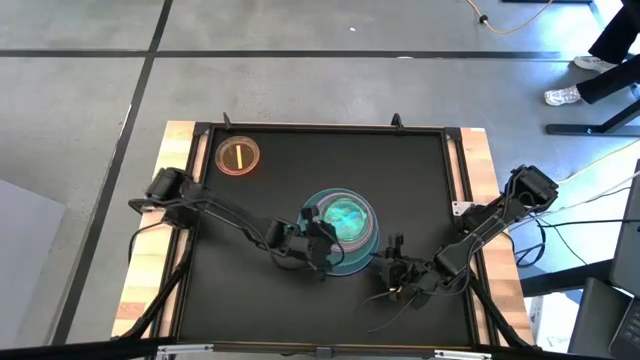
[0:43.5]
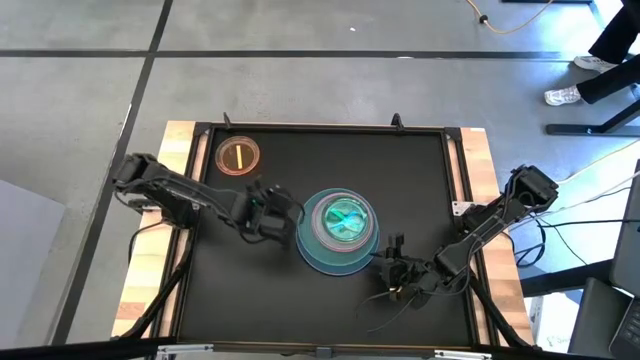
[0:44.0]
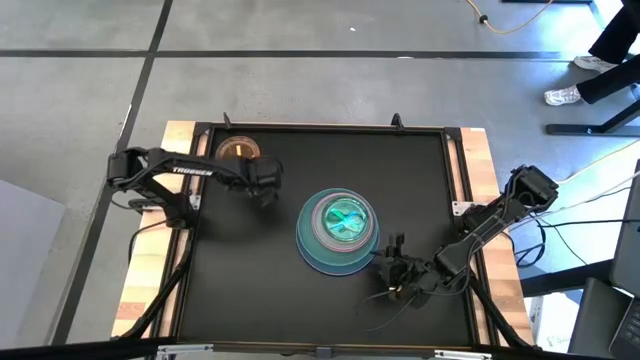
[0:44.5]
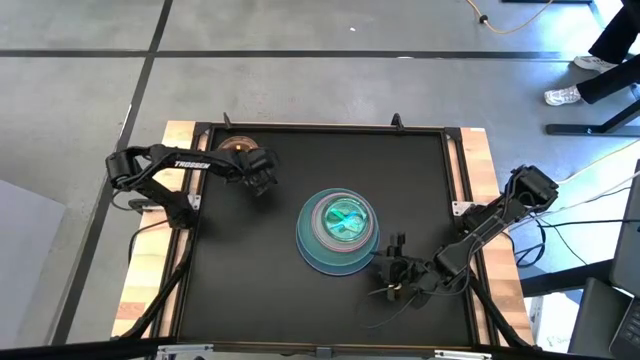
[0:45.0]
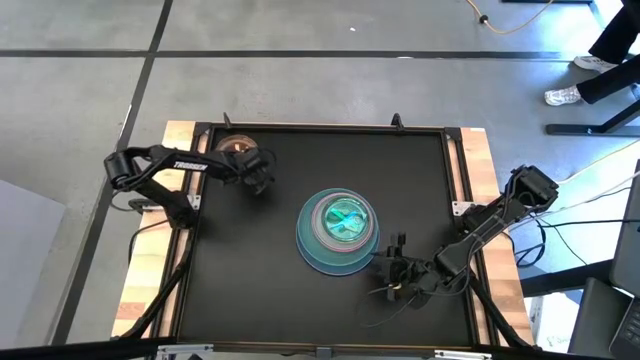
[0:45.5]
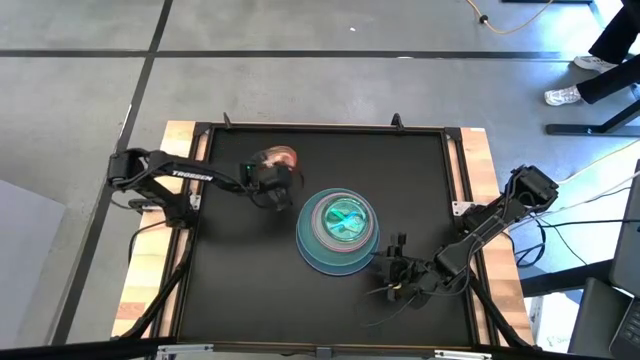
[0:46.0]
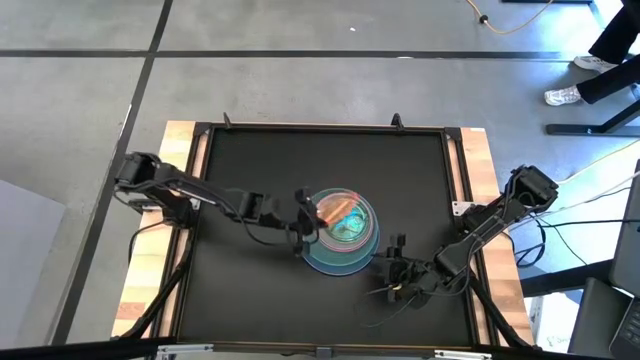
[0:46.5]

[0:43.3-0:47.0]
Task: Stack plastic plates
Stack the light orange transparent plate on the light blue transparent plate

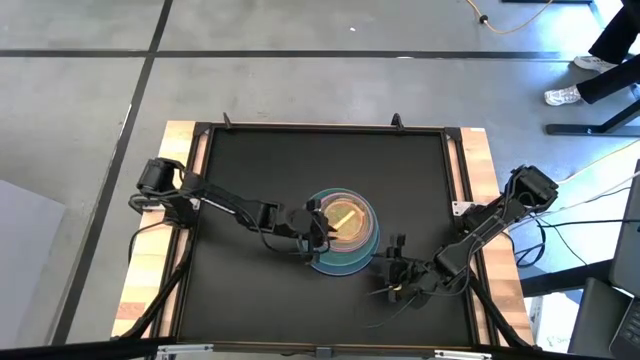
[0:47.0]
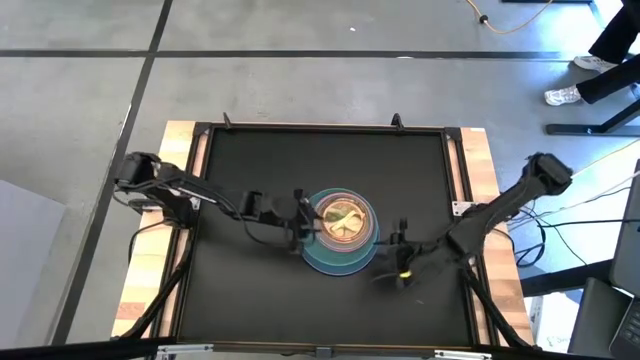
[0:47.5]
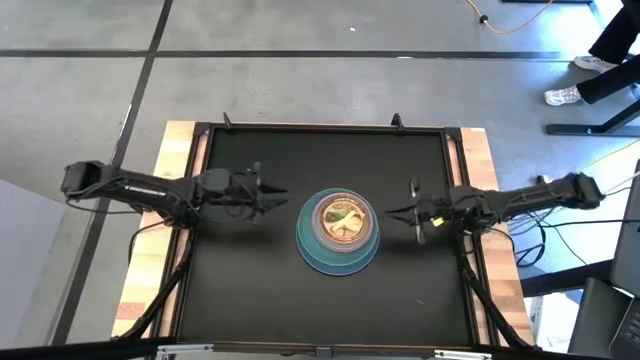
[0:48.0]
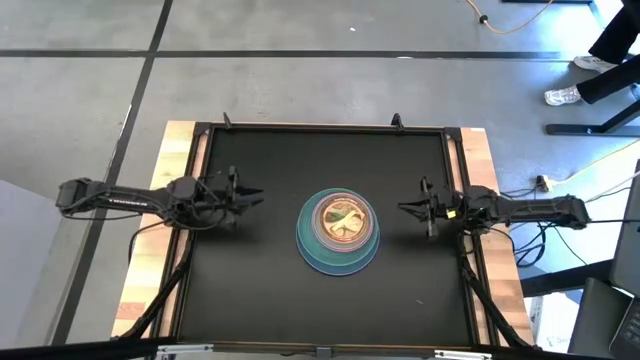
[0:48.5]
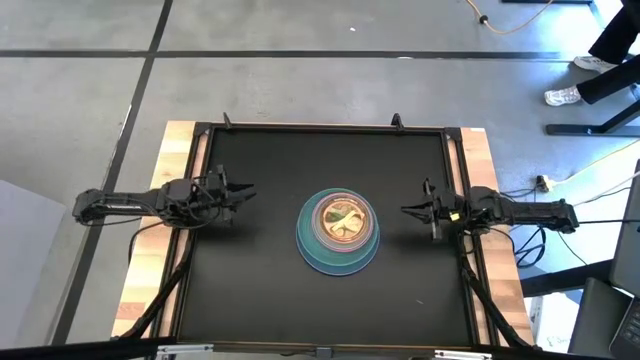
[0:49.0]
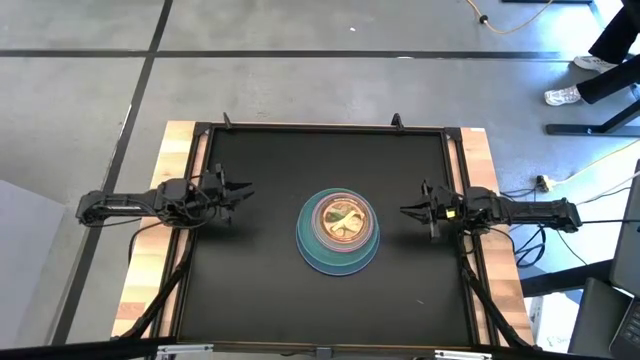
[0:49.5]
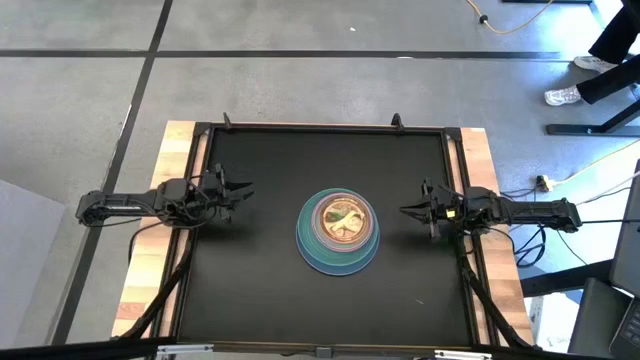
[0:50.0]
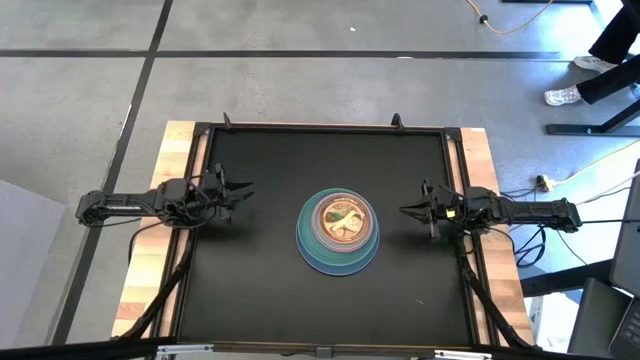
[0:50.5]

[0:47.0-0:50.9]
Return to Home Position

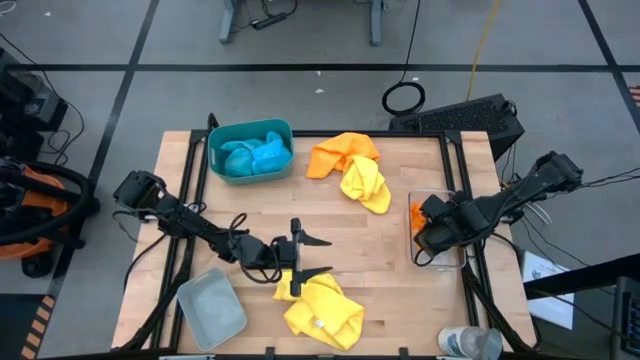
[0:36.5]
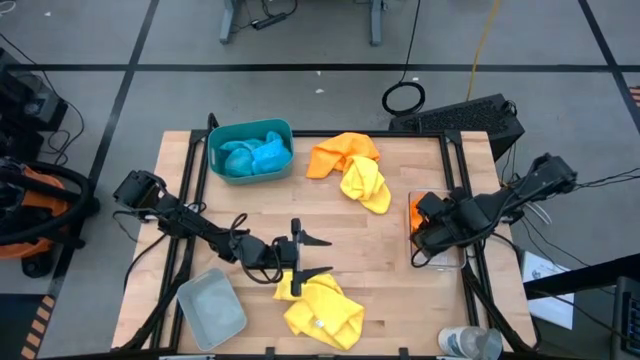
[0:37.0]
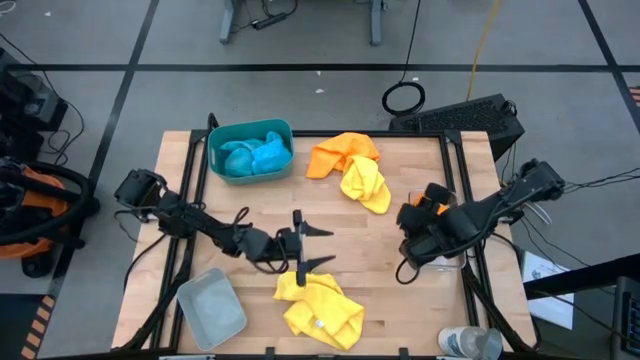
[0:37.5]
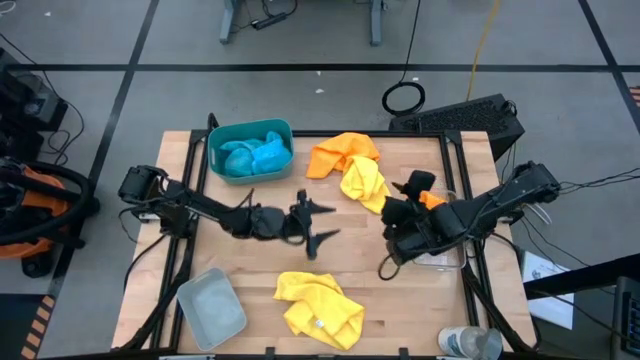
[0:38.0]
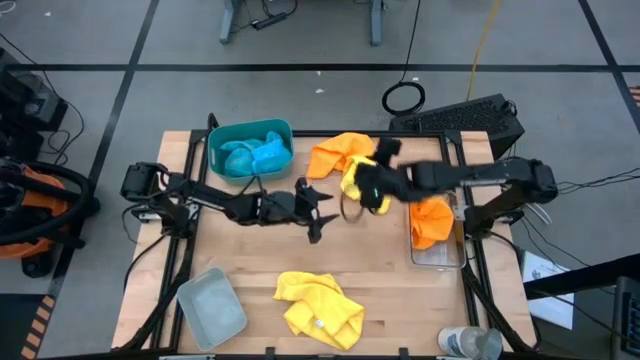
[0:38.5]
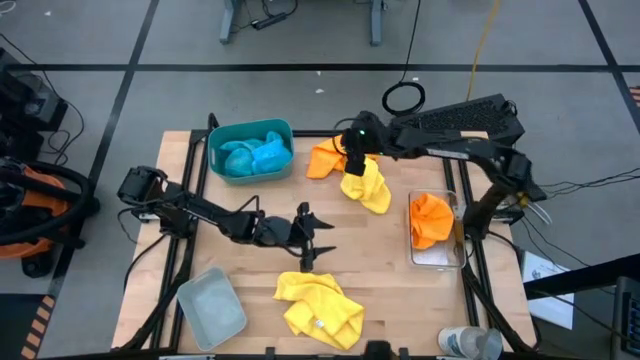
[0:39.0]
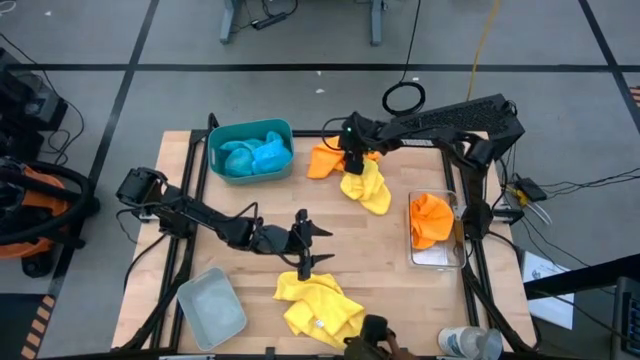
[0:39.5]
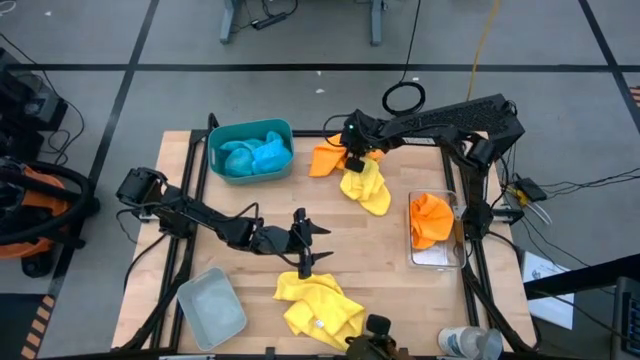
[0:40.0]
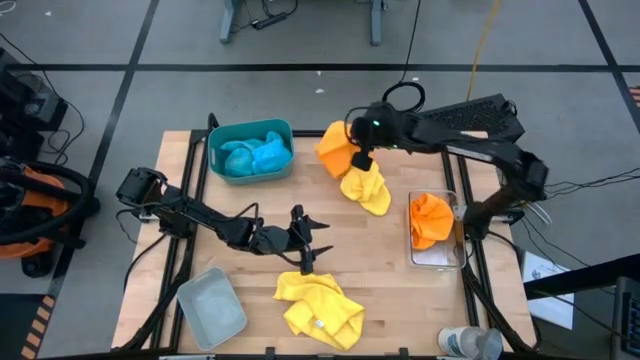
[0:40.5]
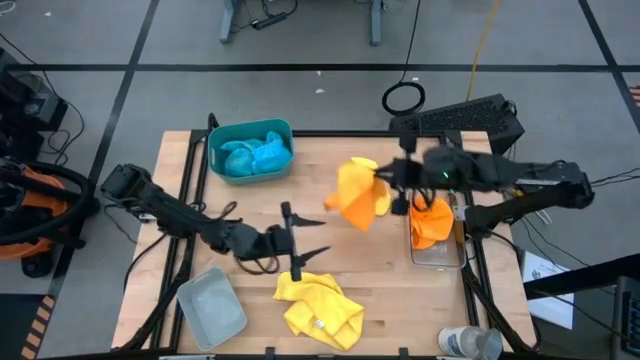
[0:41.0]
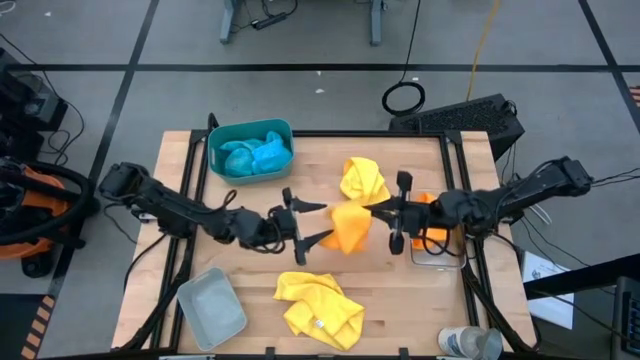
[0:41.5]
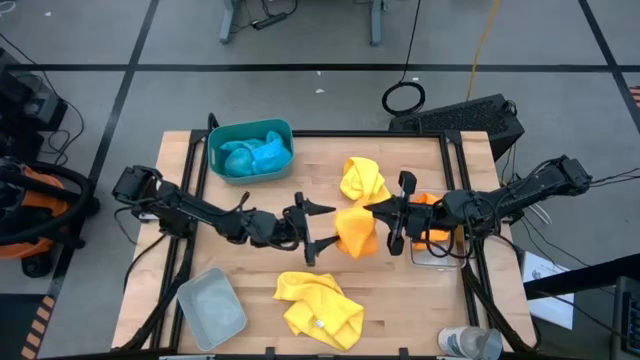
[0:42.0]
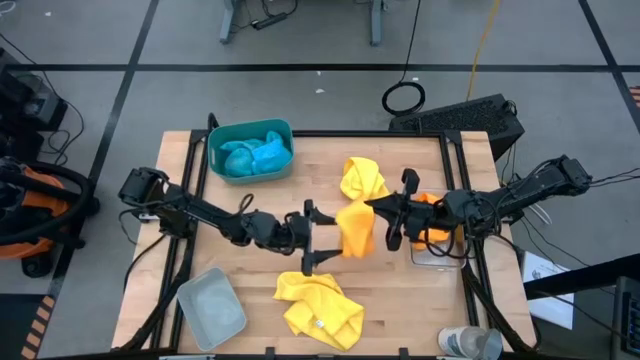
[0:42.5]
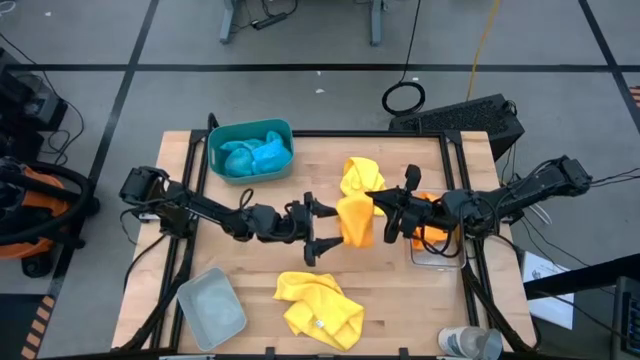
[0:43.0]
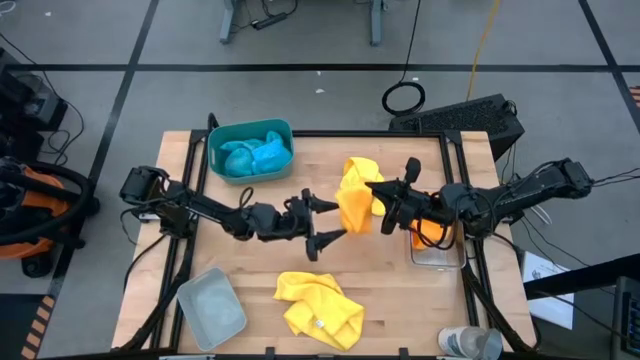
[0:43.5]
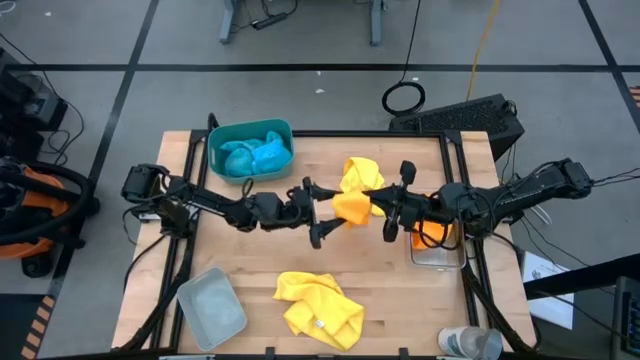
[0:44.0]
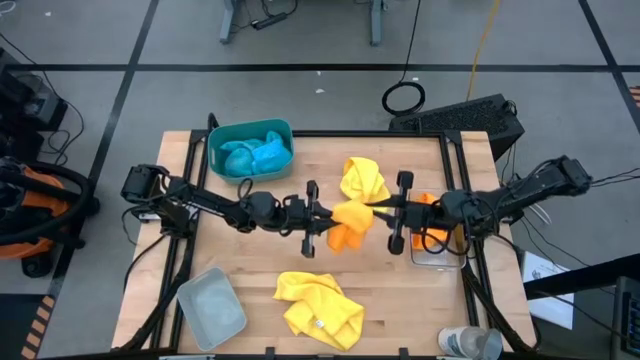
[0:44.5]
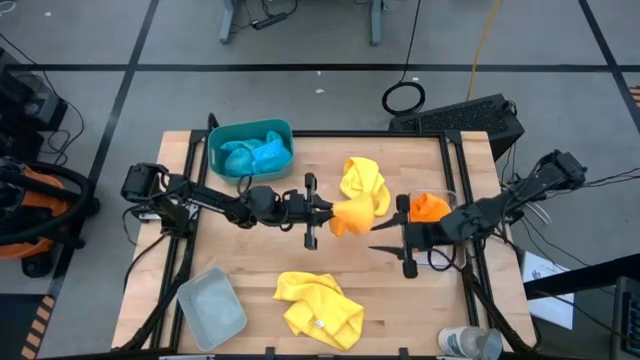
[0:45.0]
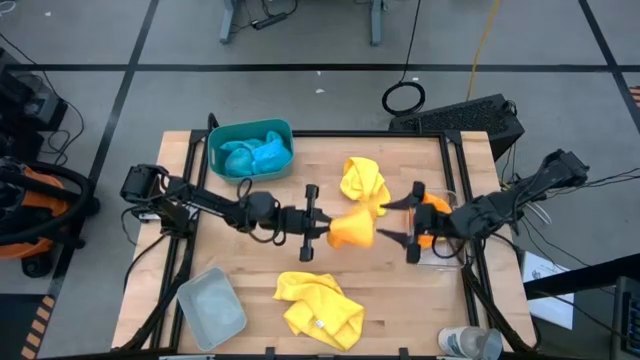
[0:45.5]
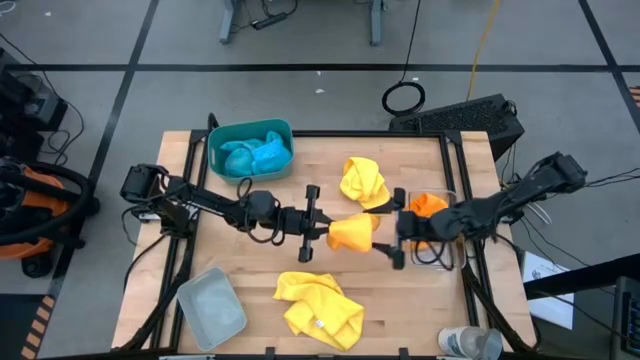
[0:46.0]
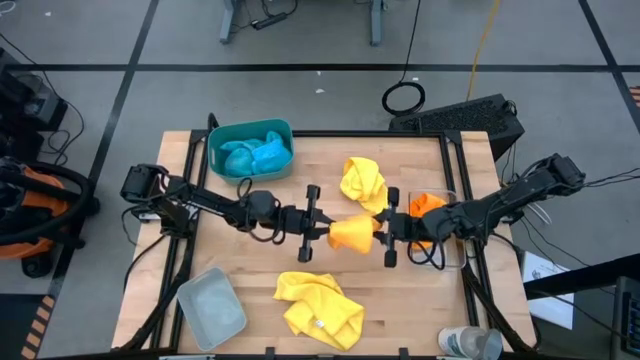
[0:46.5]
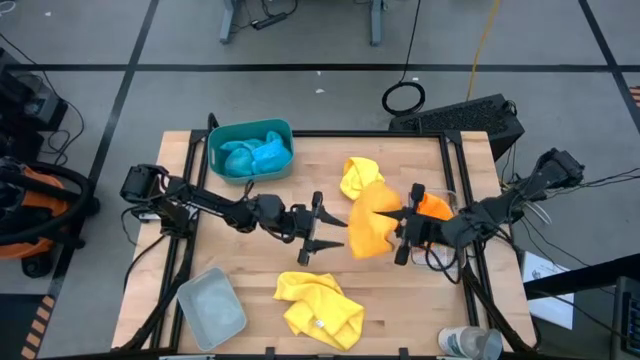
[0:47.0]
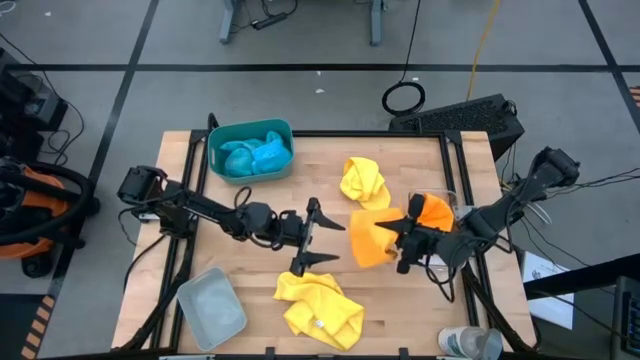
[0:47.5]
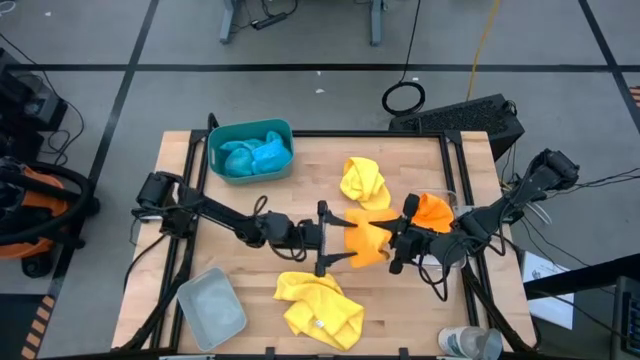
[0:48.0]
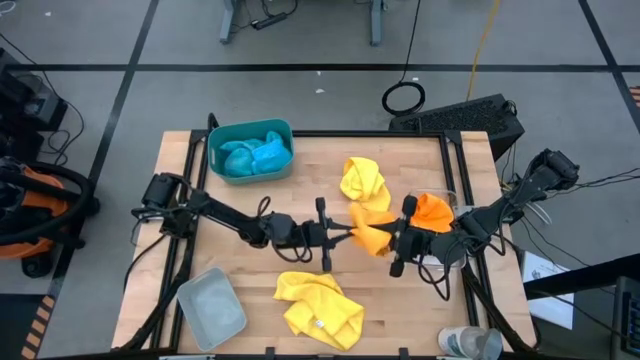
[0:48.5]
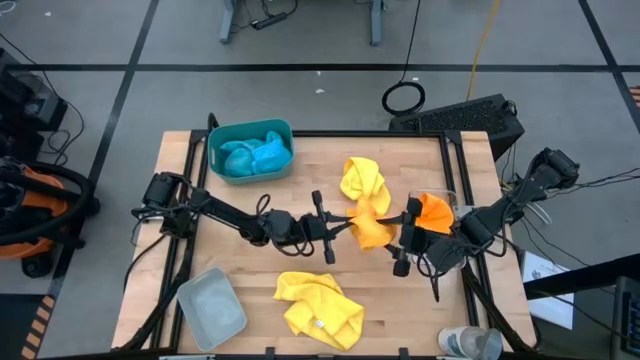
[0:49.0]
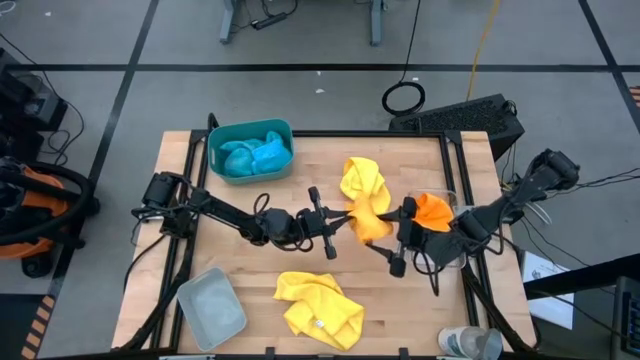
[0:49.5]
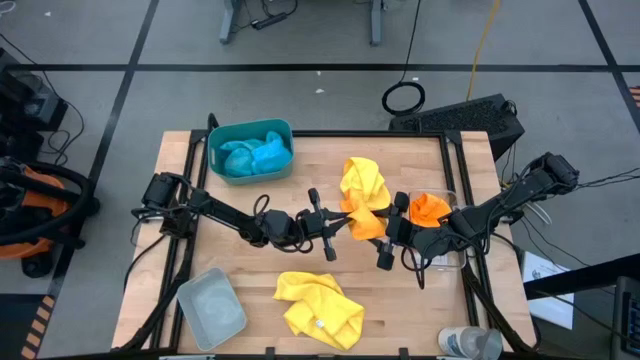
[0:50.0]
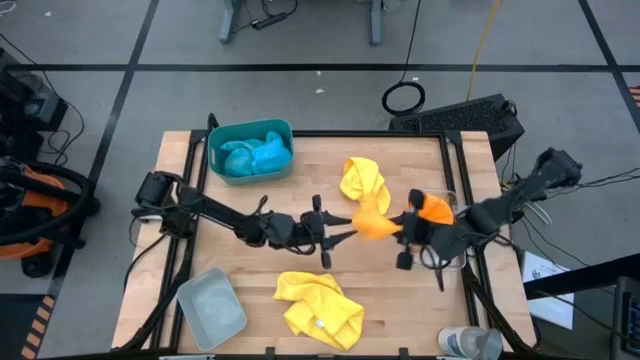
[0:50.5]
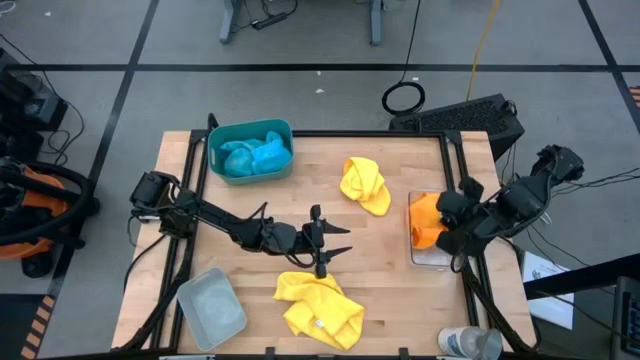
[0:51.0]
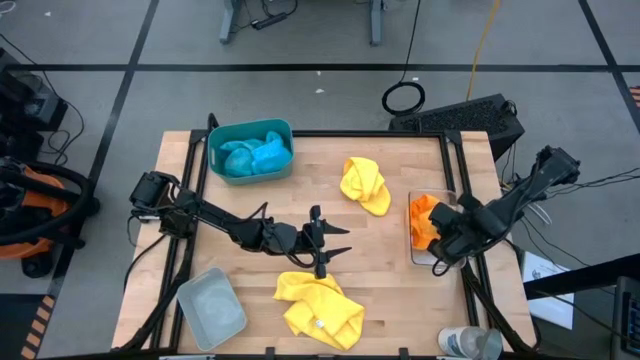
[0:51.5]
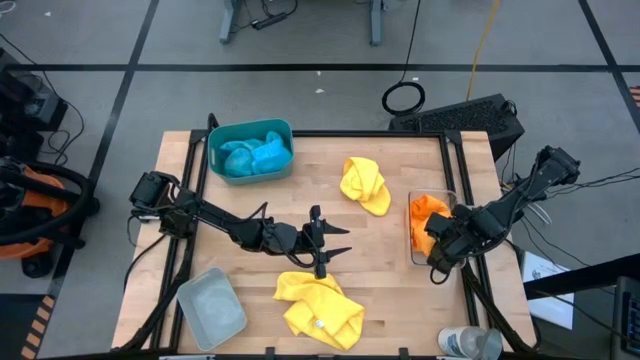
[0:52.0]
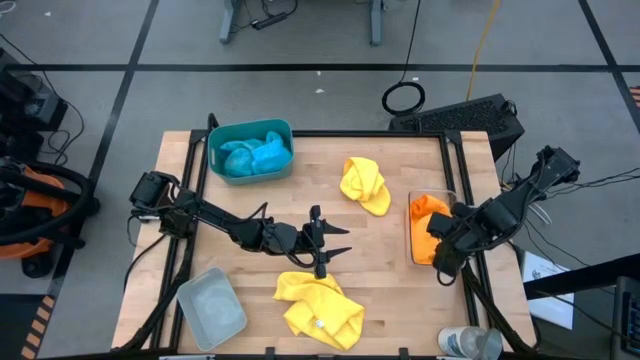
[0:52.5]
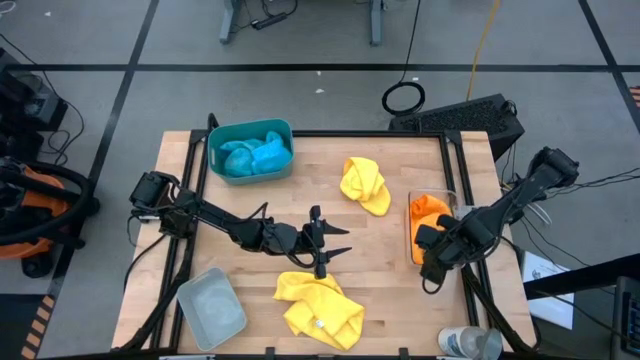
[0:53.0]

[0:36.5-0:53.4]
Task: Sort microfiber towel by color & place in baskets
Put the orange microfiber cloth into the transparent bin
